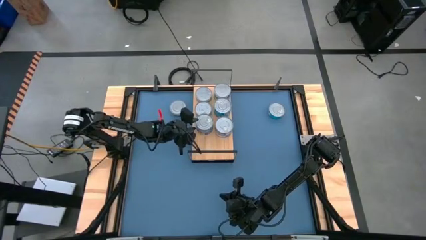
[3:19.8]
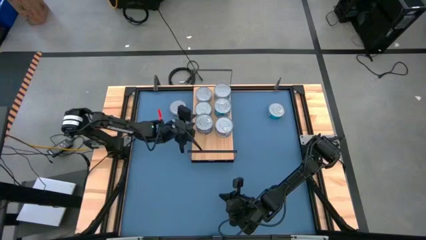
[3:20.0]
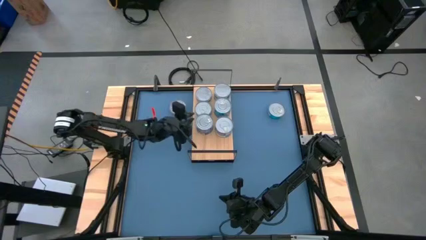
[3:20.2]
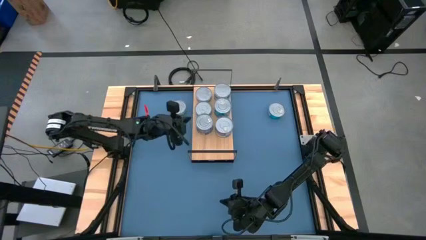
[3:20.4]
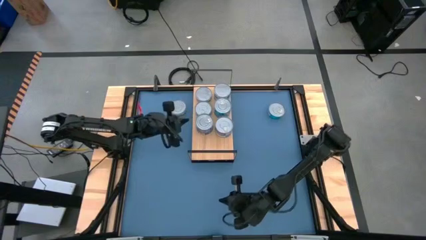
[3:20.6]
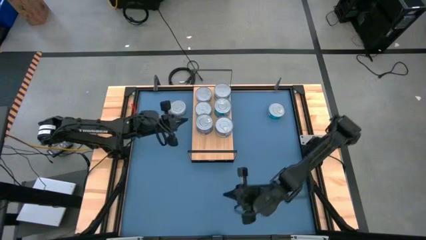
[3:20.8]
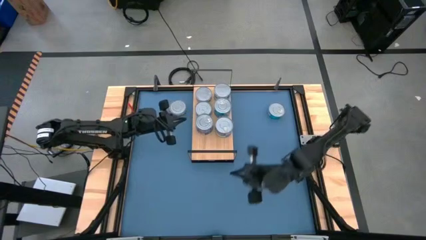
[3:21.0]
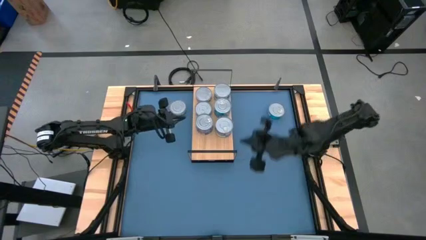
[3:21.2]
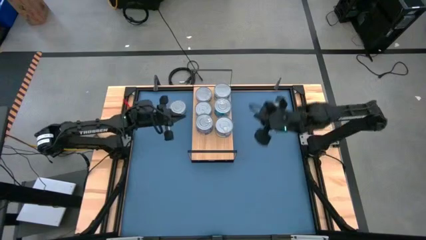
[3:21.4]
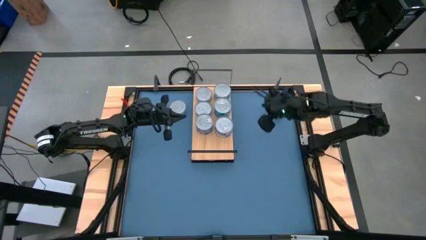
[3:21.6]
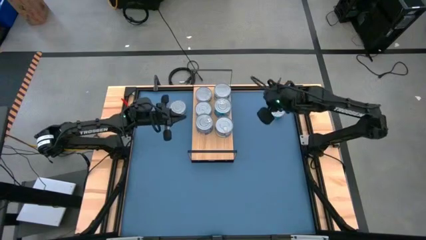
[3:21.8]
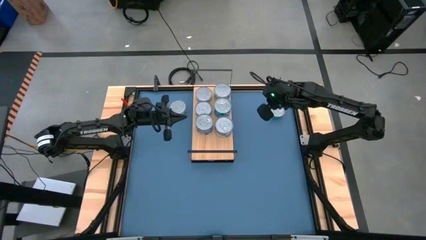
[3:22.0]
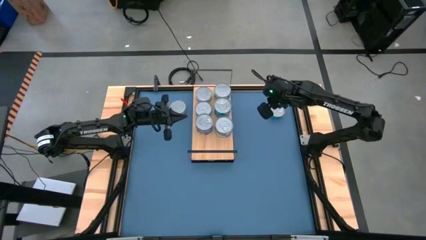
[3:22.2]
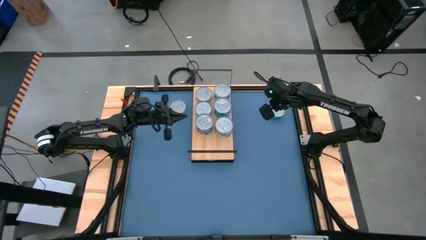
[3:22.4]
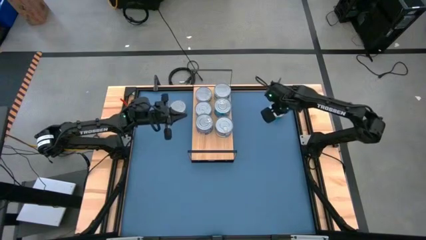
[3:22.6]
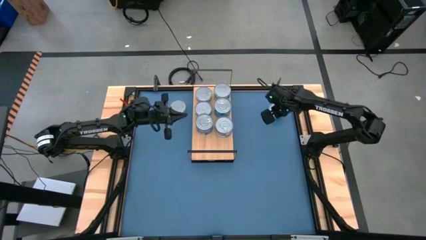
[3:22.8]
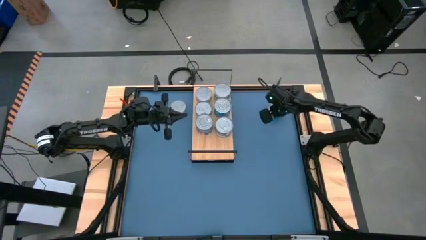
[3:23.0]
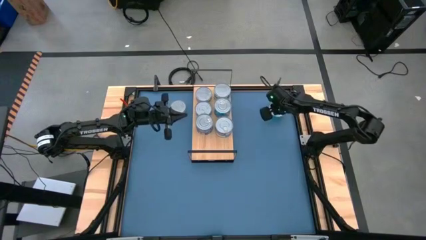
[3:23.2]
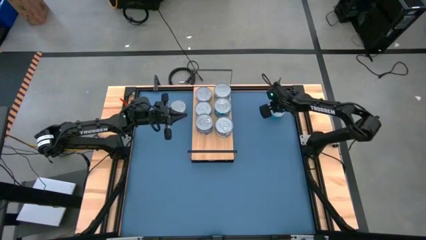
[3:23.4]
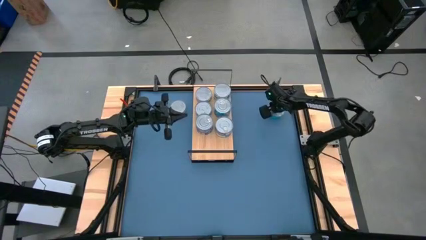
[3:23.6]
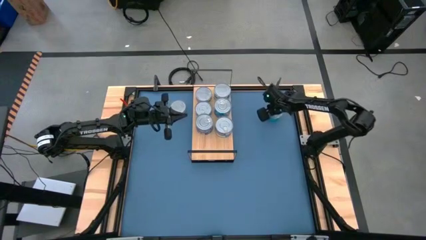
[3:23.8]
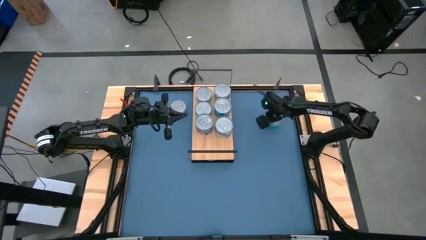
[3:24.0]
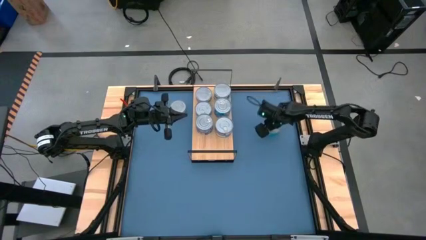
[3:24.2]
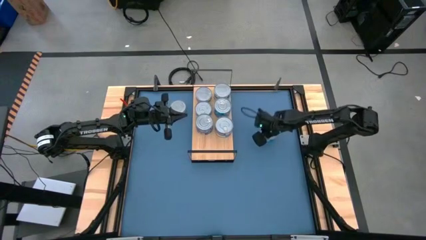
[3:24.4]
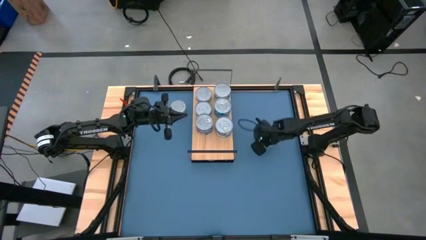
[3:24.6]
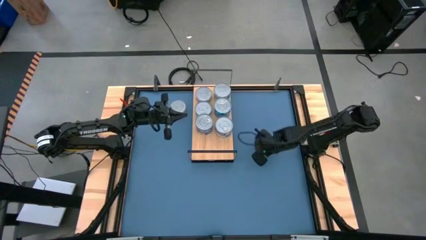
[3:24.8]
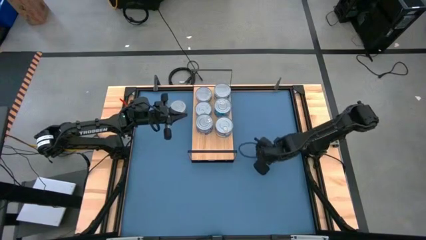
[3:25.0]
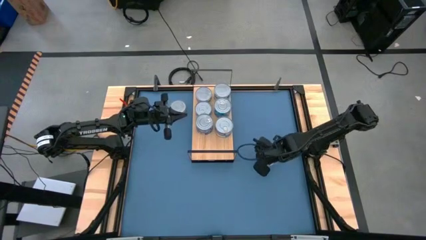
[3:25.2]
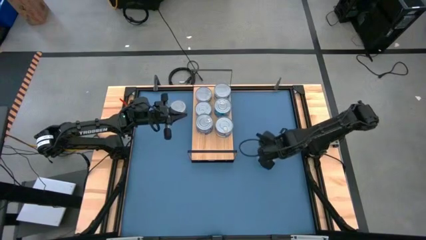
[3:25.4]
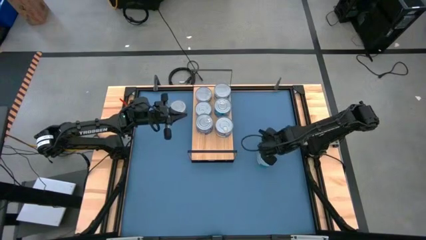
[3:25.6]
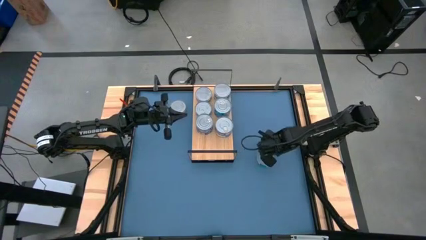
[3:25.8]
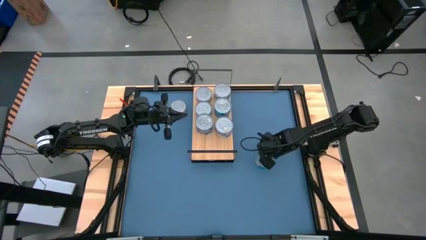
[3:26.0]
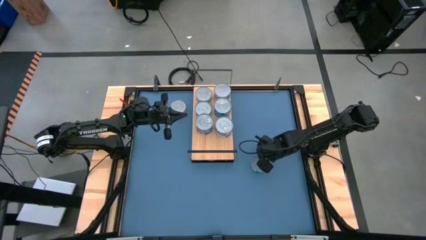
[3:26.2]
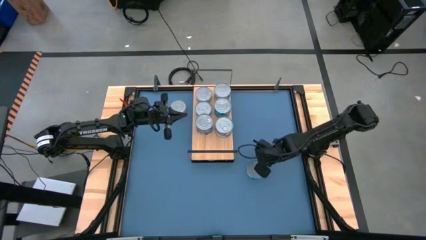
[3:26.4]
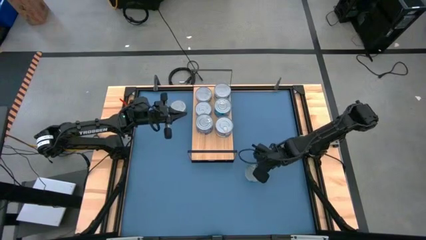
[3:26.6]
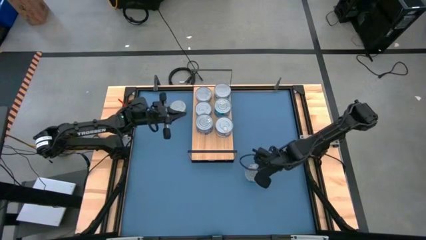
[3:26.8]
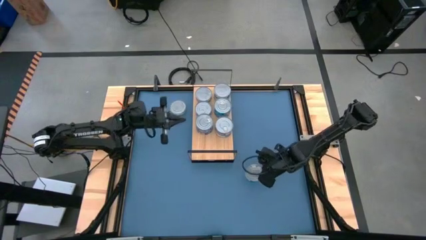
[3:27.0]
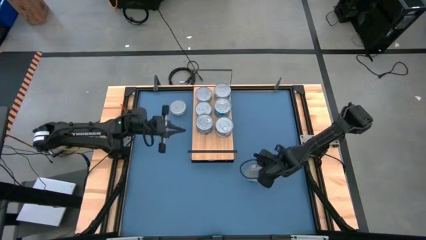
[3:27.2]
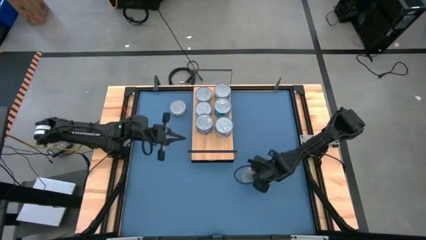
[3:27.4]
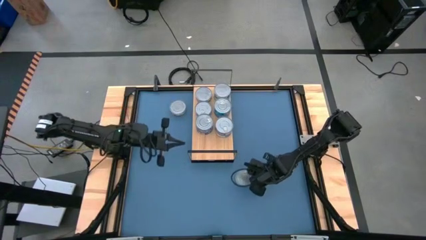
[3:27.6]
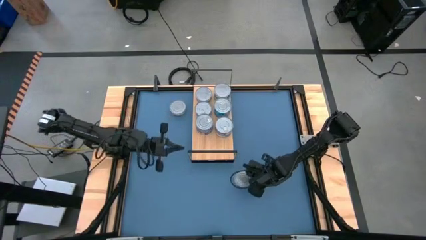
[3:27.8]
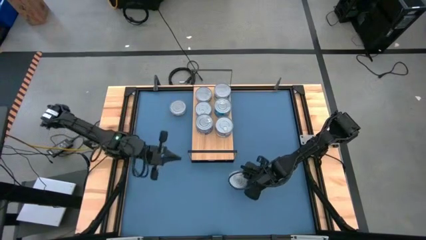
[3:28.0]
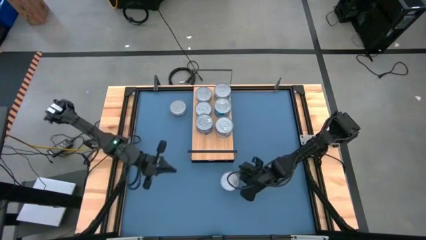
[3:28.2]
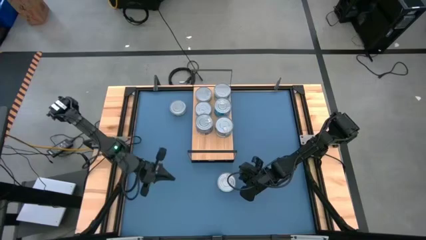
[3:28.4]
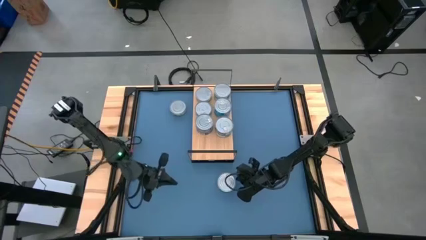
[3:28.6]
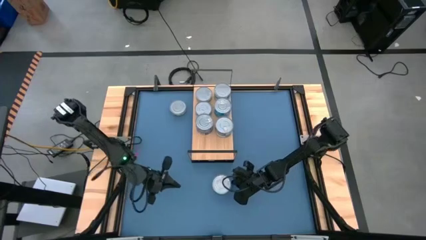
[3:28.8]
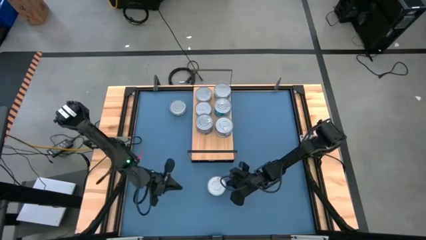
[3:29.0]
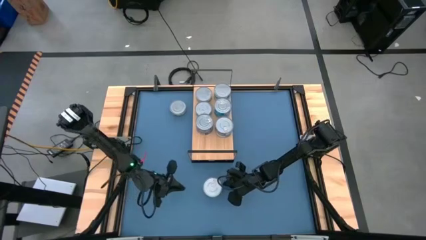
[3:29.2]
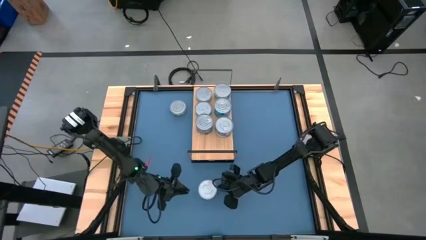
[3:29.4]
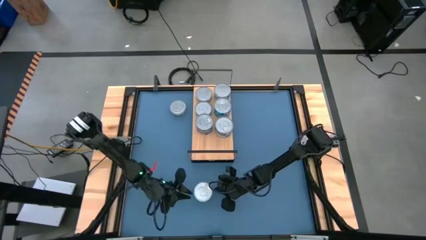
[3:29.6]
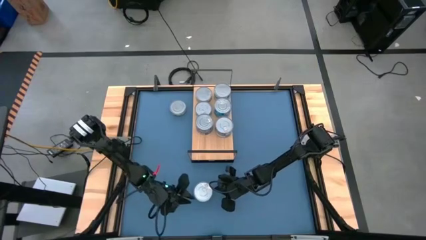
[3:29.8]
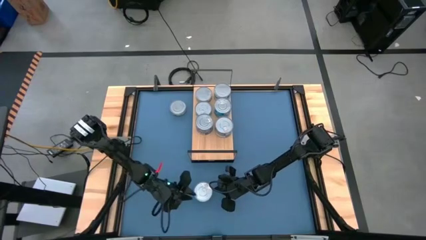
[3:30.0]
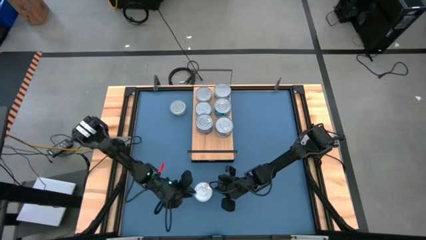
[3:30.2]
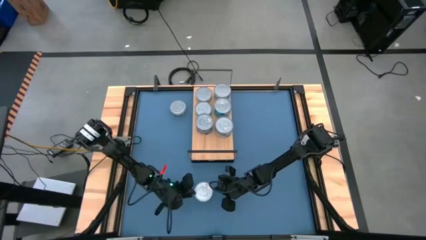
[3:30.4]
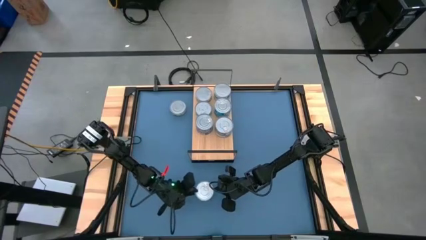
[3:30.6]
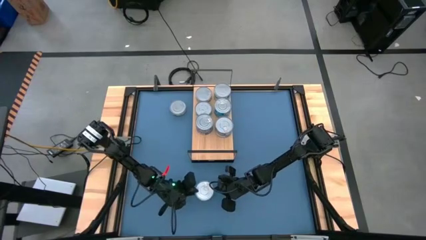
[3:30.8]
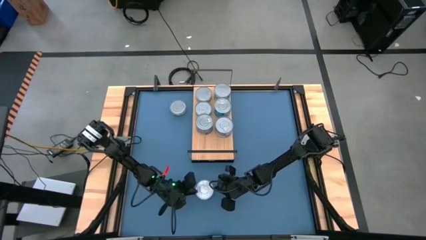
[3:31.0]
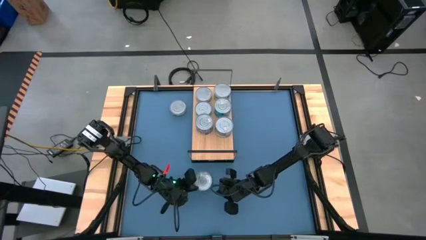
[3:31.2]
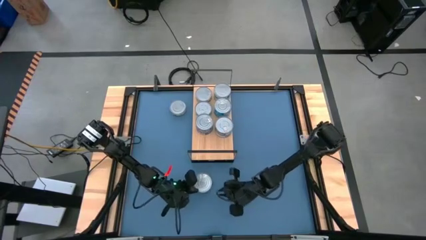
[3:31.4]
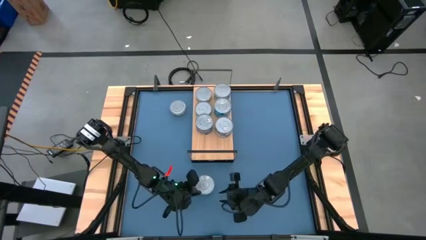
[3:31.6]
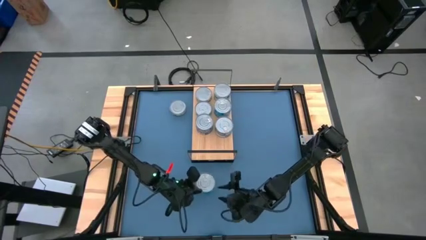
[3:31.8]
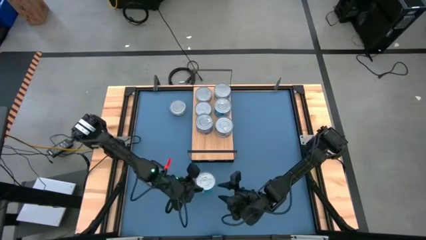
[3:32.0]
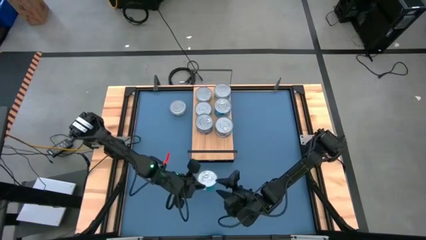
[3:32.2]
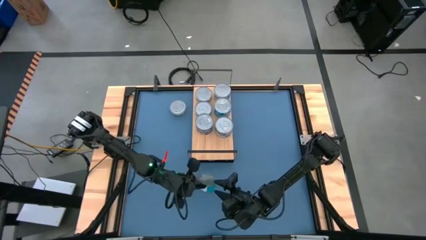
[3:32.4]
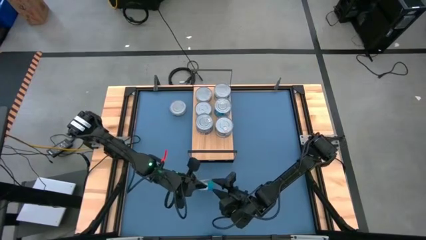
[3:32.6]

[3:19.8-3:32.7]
Task: Stack canned seafood by type on shelf
Stack the yellow blue tuna can on top of the other yellow blue tuna can on the shelf

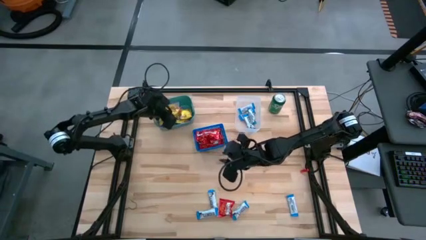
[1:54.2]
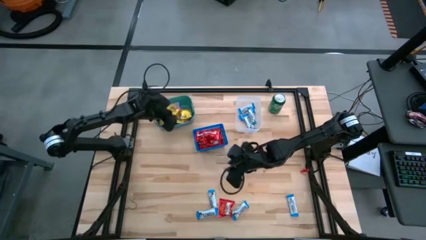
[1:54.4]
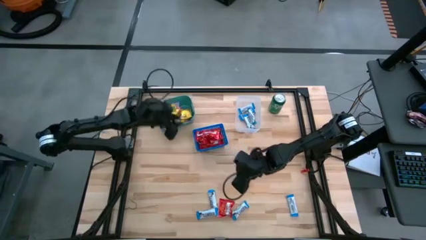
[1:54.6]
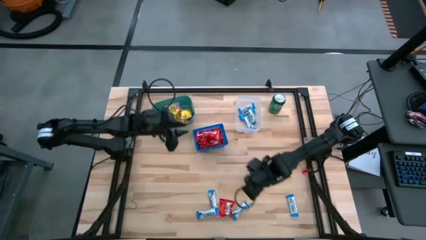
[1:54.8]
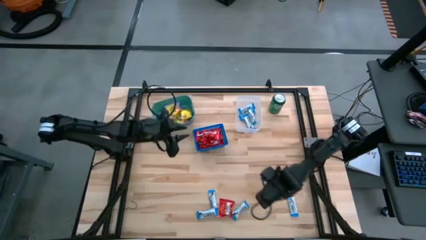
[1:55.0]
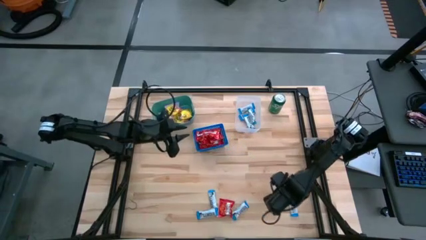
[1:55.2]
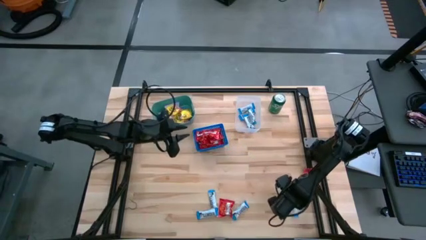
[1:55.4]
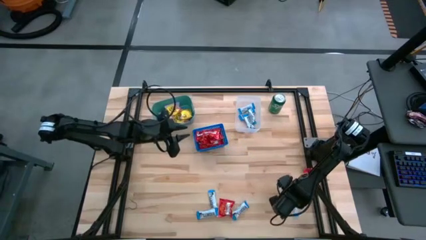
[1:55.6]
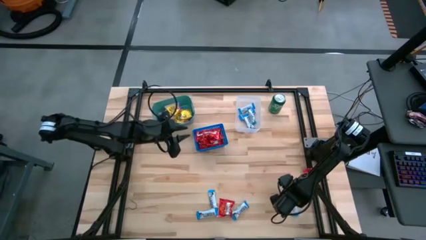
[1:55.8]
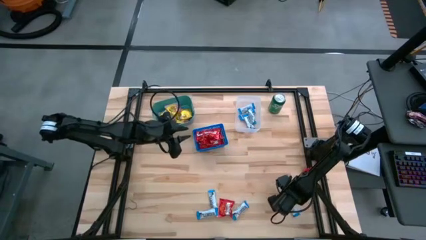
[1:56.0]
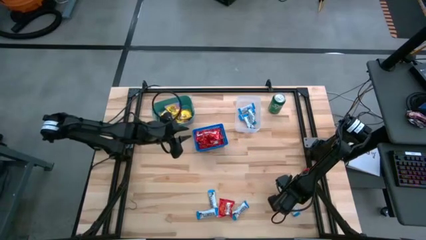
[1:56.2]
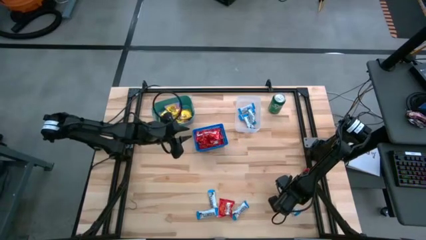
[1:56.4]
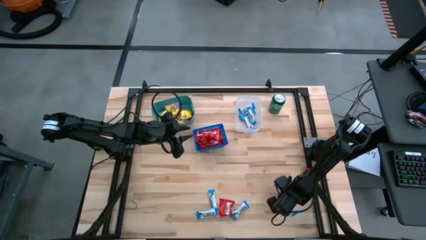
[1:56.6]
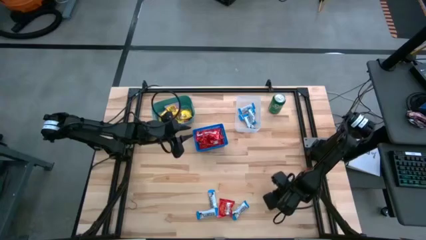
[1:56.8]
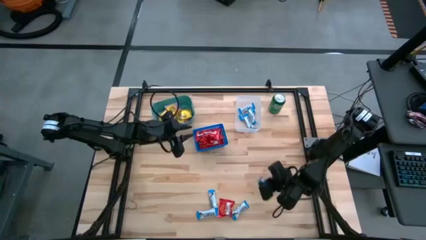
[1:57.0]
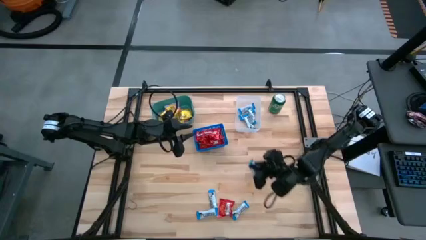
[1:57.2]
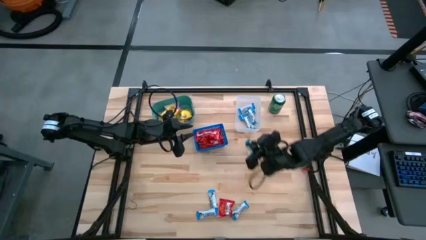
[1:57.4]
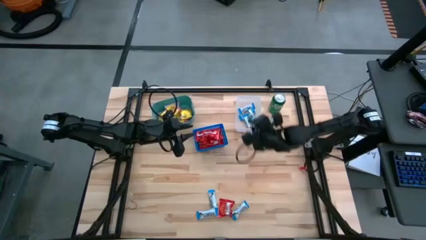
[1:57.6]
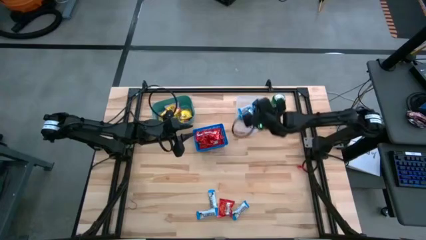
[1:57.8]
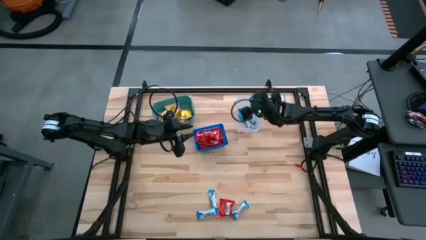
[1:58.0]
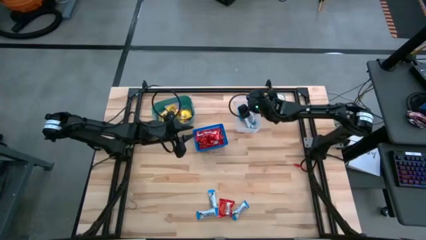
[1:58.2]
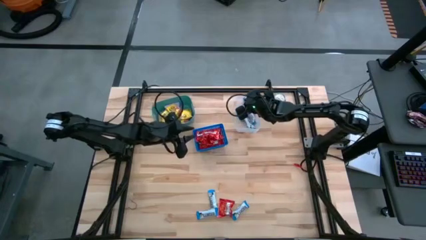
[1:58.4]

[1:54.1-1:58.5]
Task: Sort candy
Put the hersheys bar into the transparent bin
